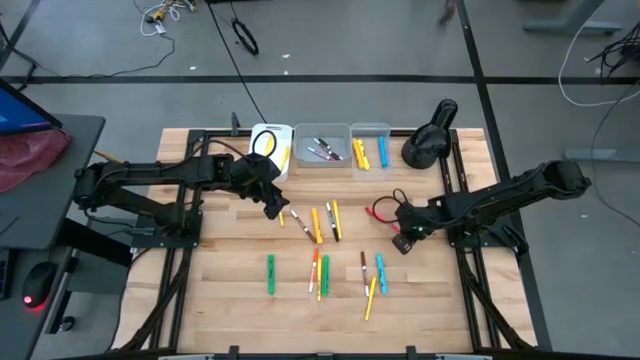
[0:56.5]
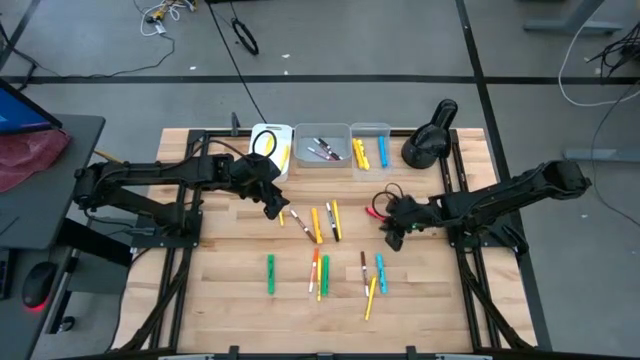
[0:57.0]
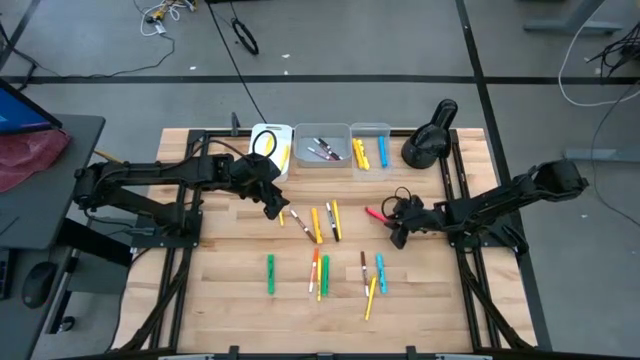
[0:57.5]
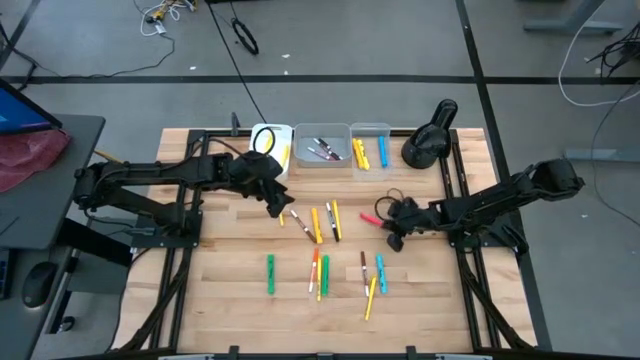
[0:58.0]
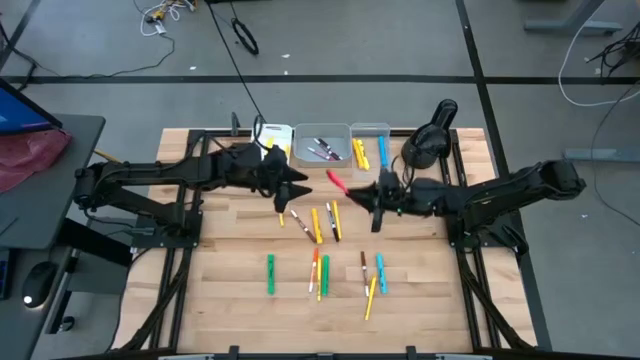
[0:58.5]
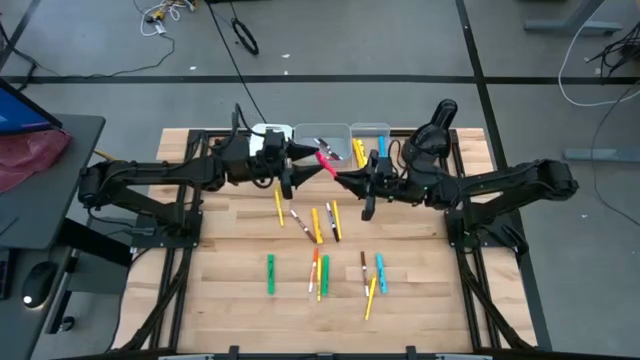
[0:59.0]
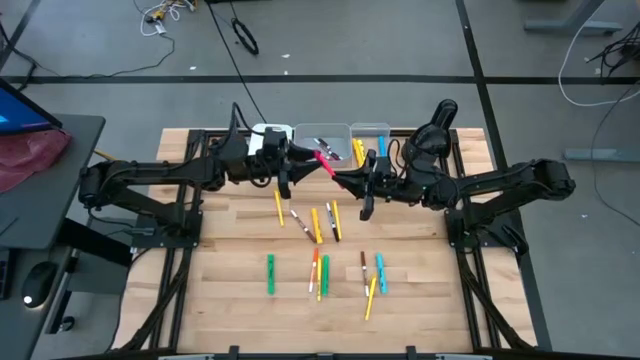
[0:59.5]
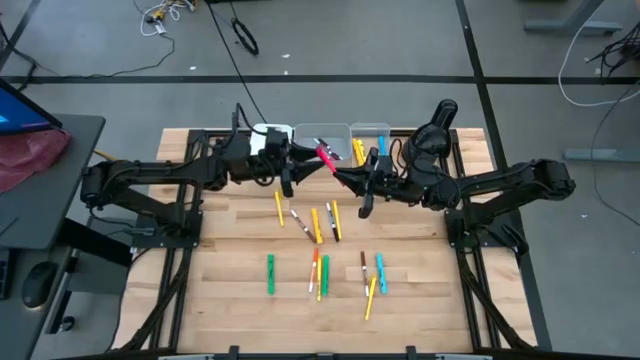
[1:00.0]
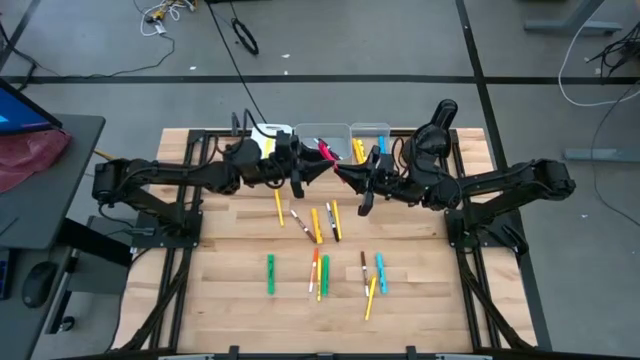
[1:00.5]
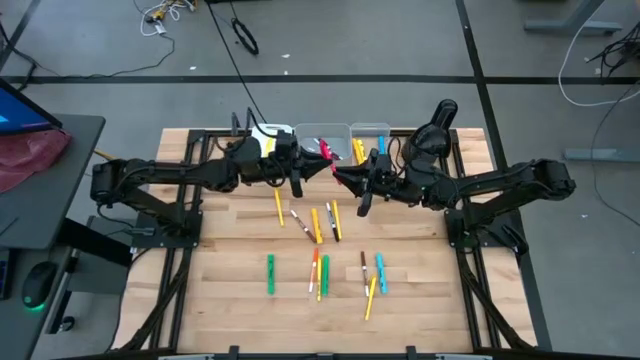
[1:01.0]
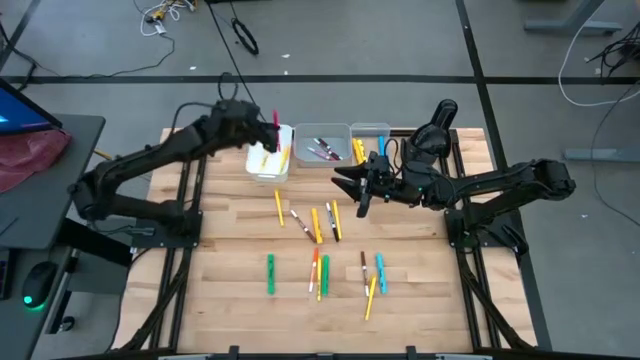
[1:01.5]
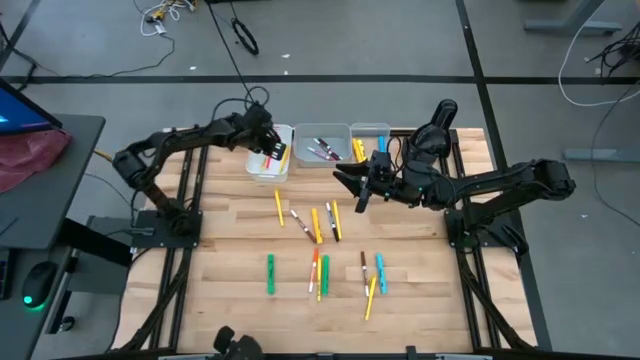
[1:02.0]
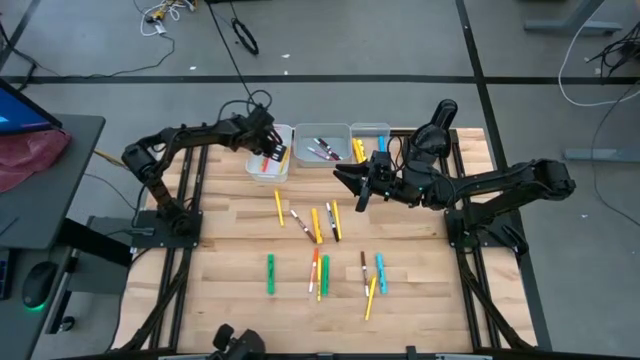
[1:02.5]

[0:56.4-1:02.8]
Task: Pick & Place Markers
Put the pink pen into the white bin

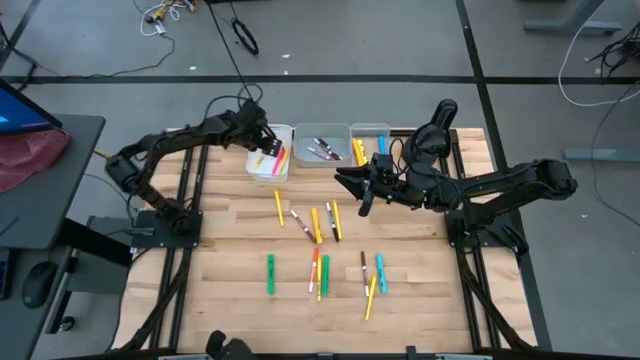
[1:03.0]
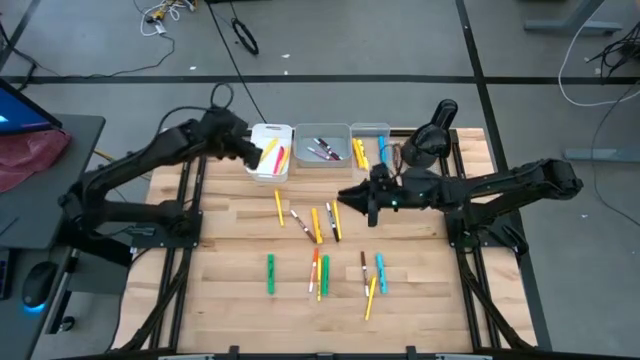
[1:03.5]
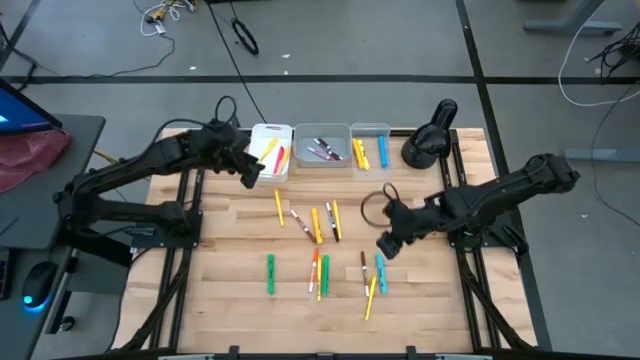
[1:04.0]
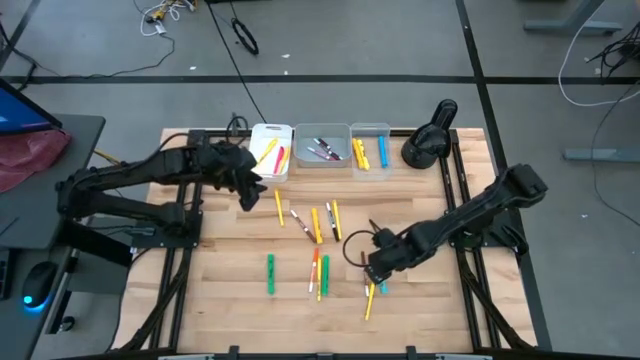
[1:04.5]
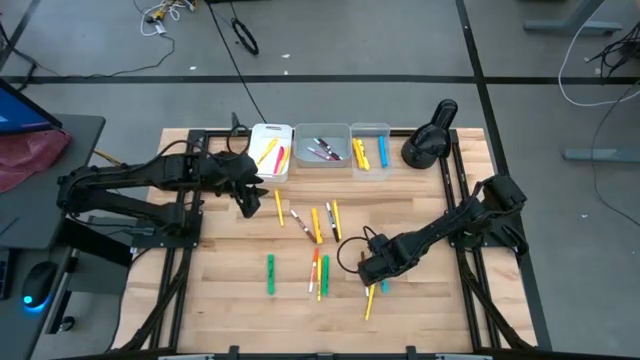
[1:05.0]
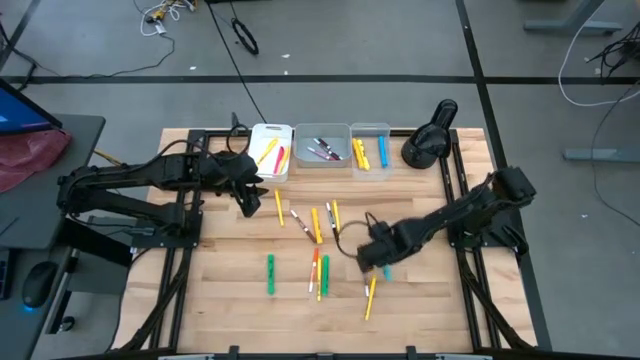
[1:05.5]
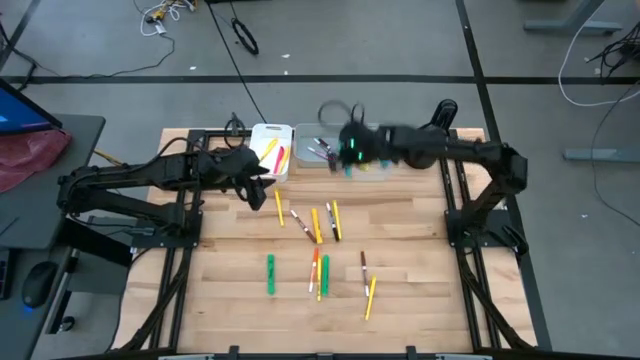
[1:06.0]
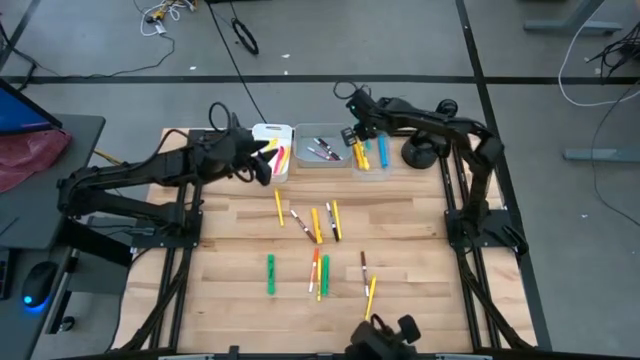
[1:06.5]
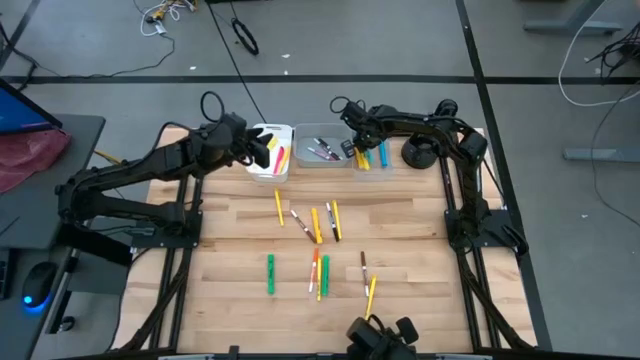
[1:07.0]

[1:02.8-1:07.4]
Put the light blue highlighter pen into the transparent bin

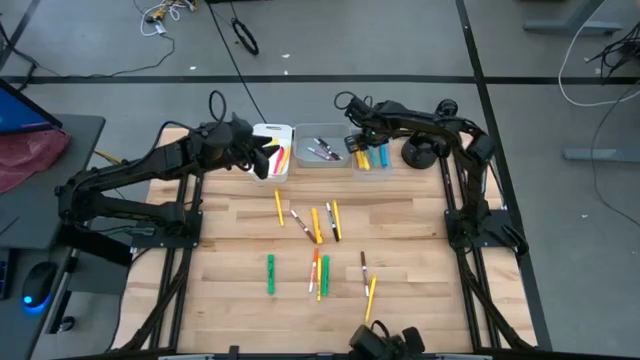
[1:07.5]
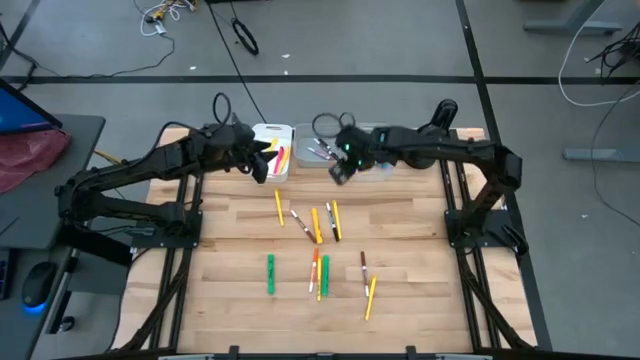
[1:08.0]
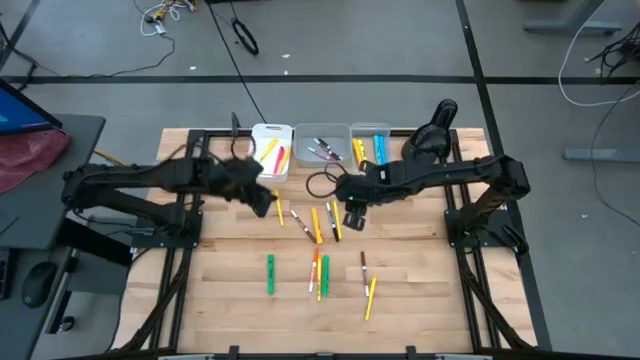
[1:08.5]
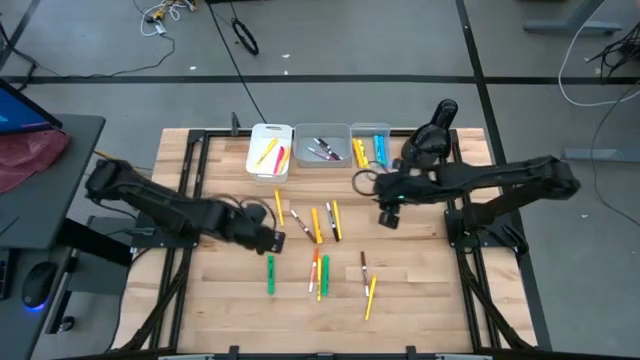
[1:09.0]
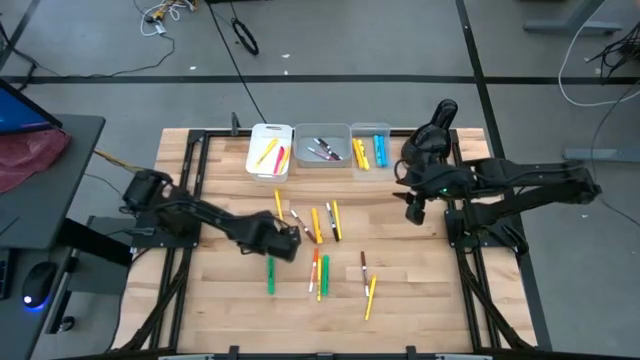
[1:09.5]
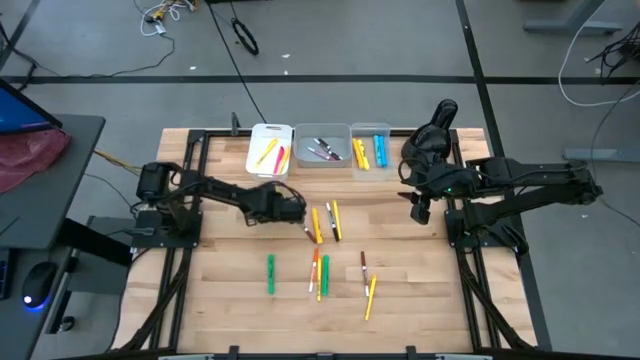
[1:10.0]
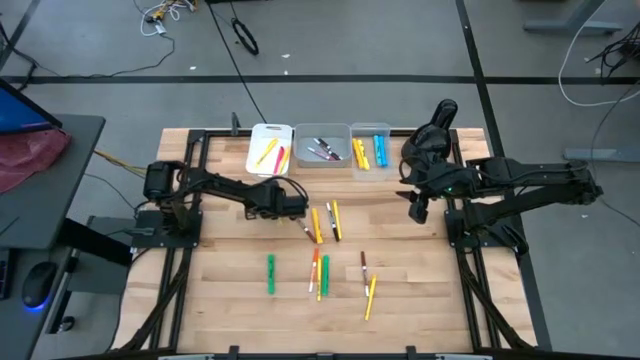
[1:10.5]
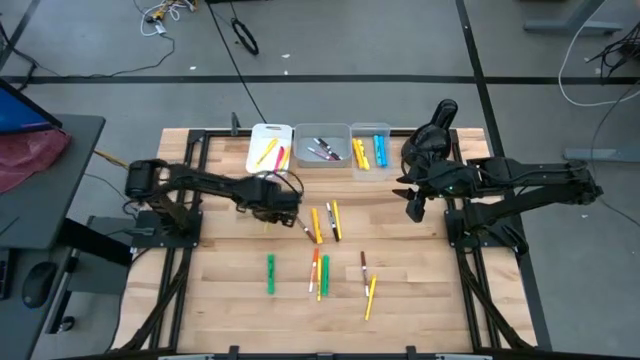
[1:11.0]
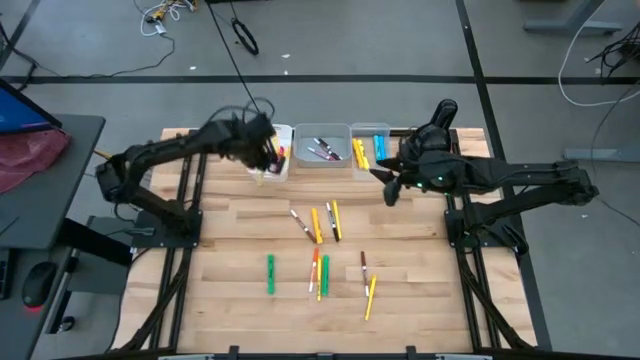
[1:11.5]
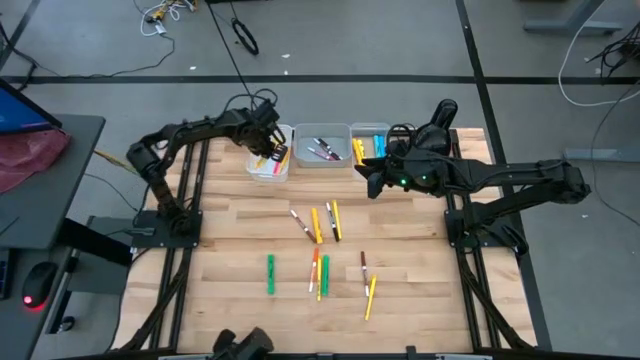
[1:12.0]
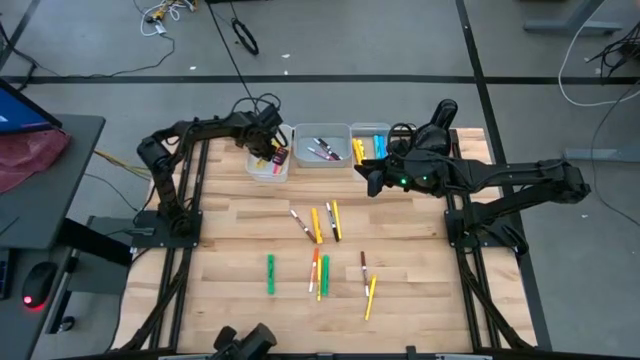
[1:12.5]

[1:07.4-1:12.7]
Put the yellow pen into the white bin

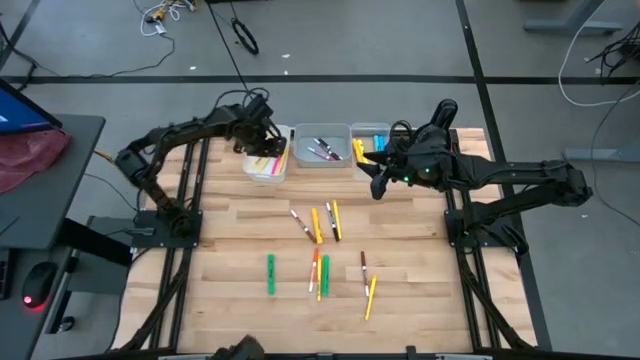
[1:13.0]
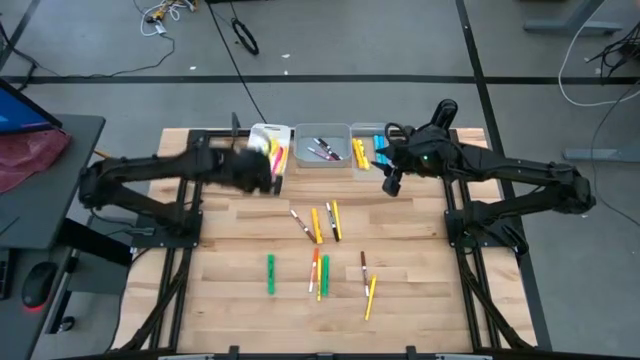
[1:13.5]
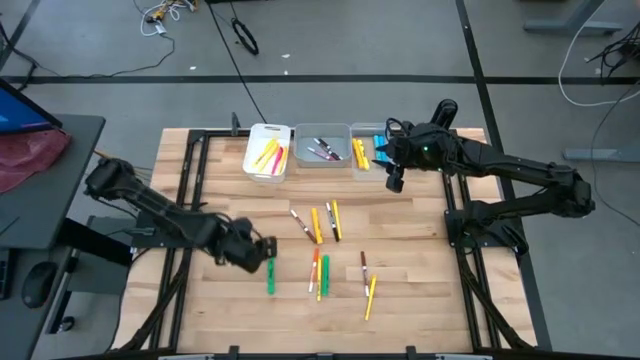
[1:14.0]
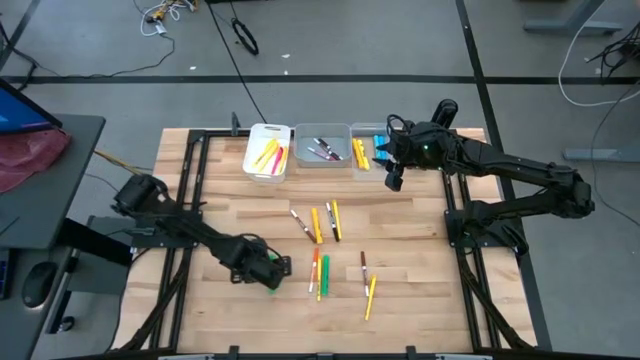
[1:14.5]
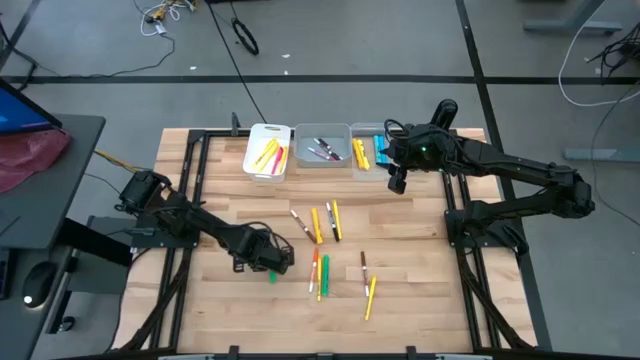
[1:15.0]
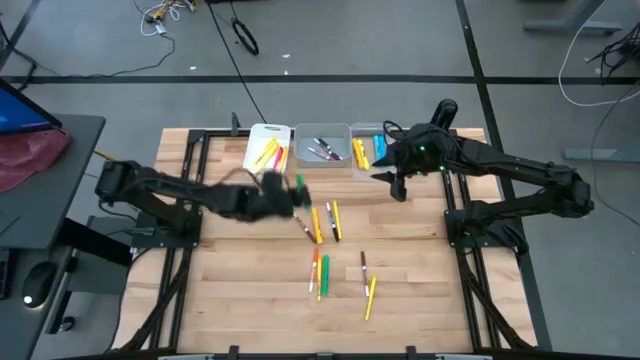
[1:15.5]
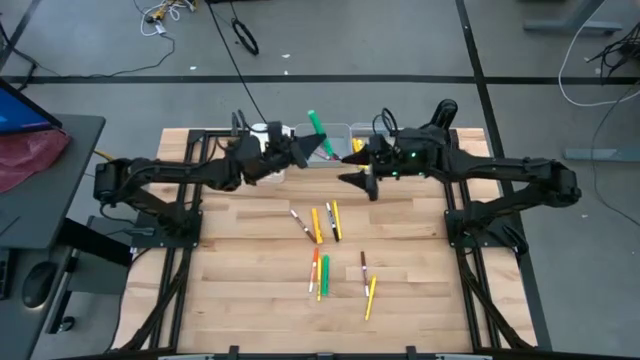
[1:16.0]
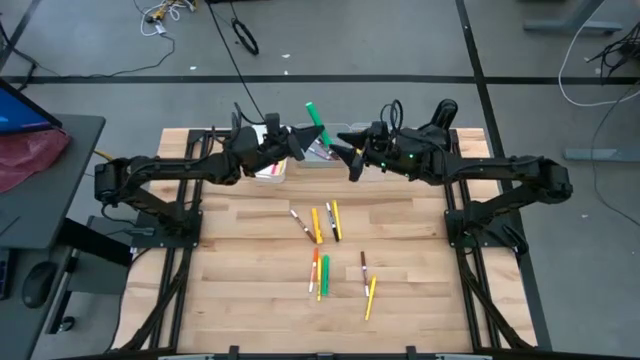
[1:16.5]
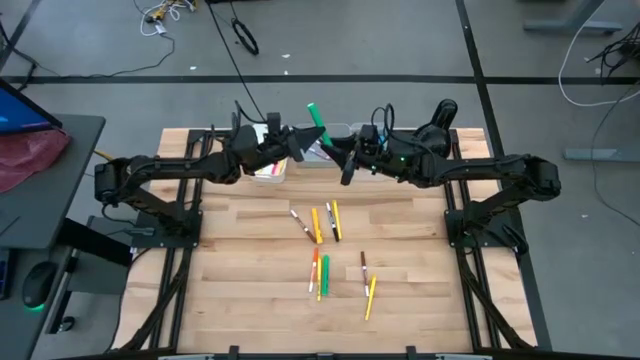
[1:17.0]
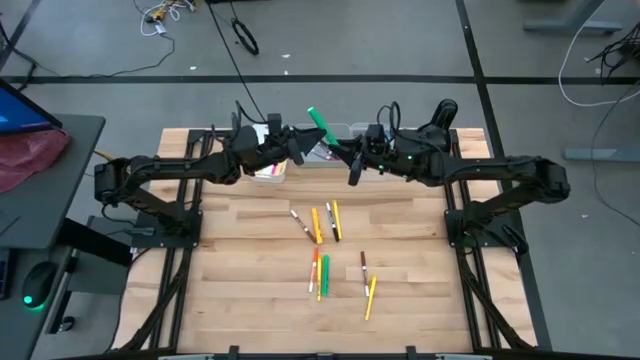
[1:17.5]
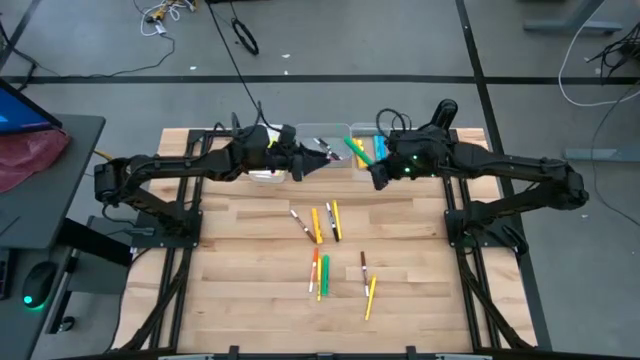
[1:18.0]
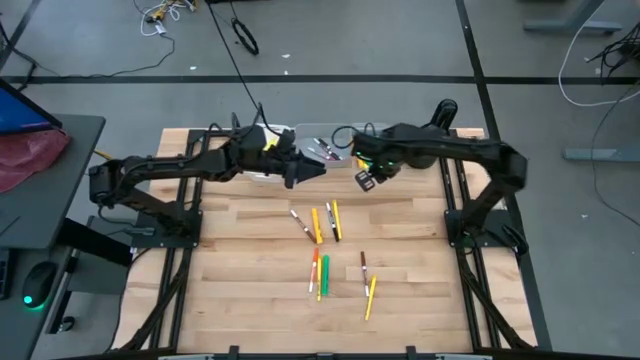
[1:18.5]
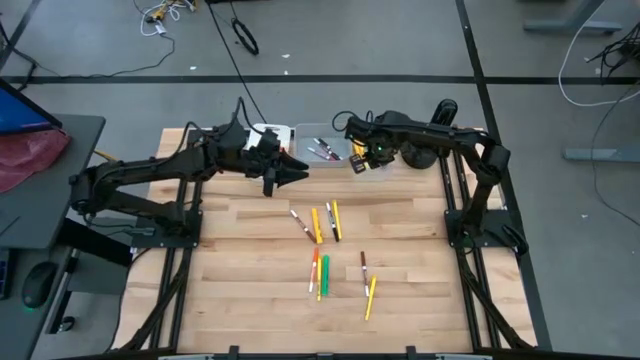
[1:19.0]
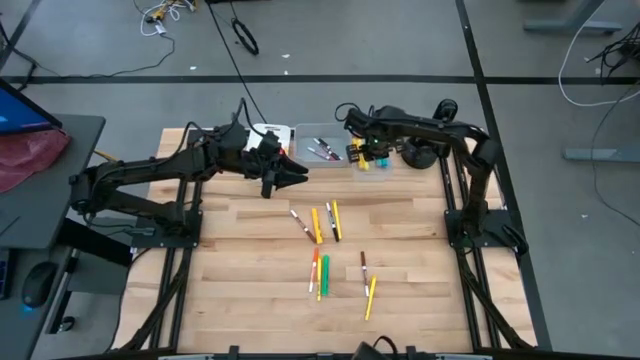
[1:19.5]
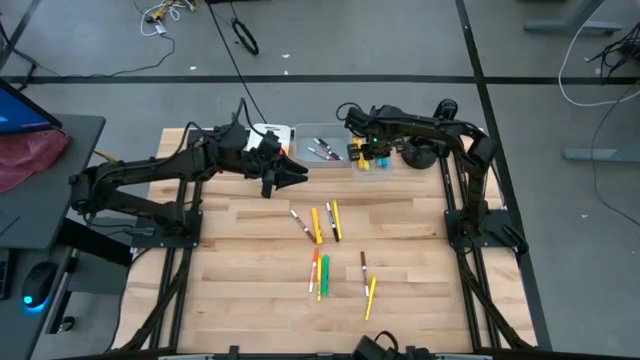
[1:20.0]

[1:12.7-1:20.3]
Put the green highlighter pen into the transparent bin
